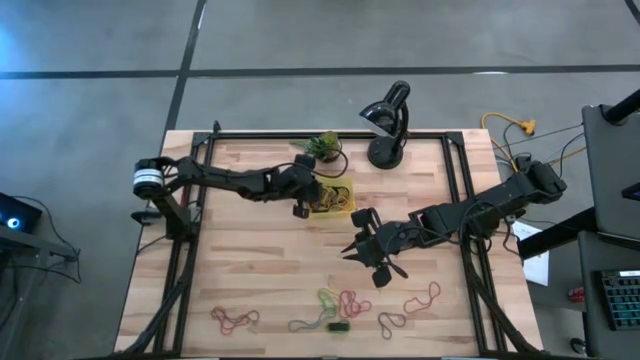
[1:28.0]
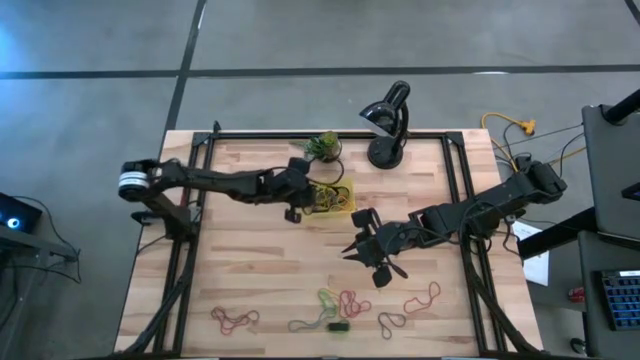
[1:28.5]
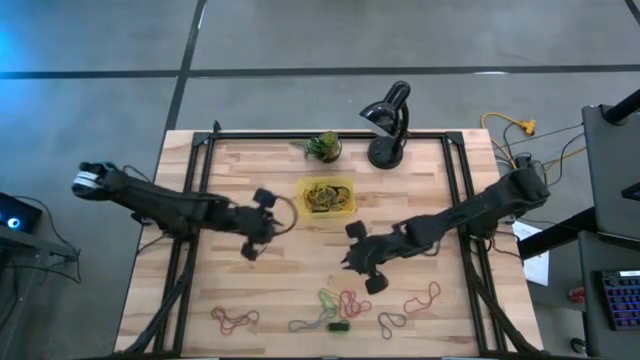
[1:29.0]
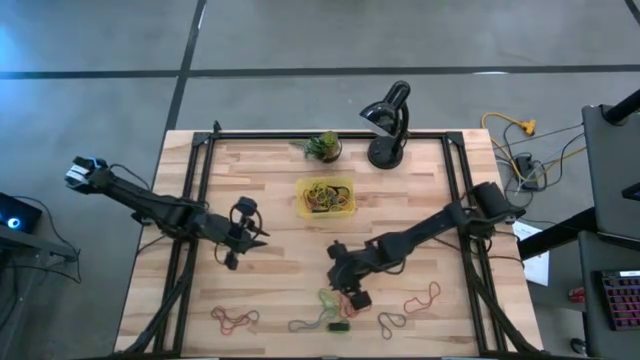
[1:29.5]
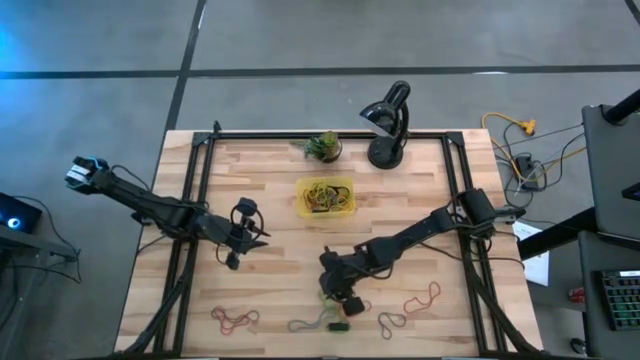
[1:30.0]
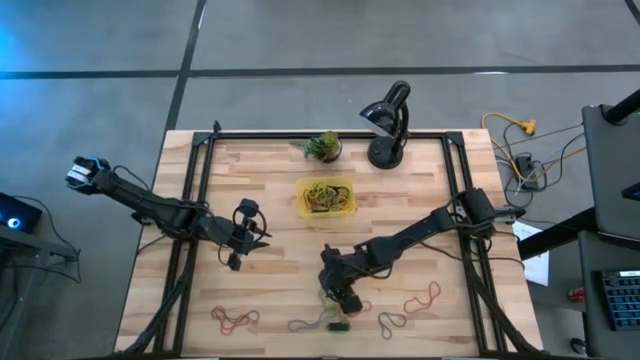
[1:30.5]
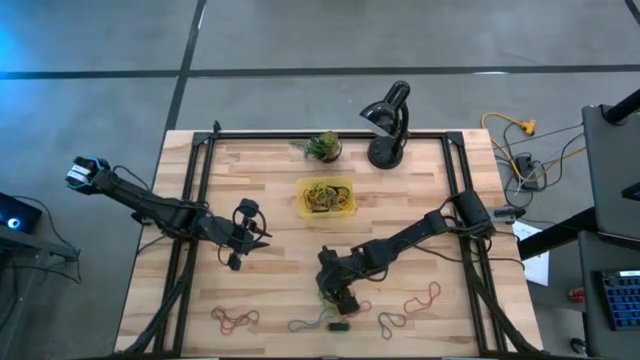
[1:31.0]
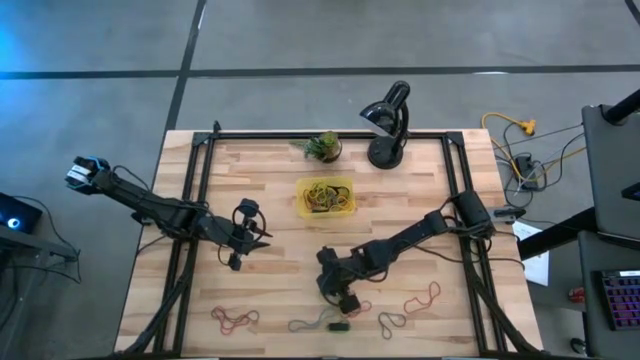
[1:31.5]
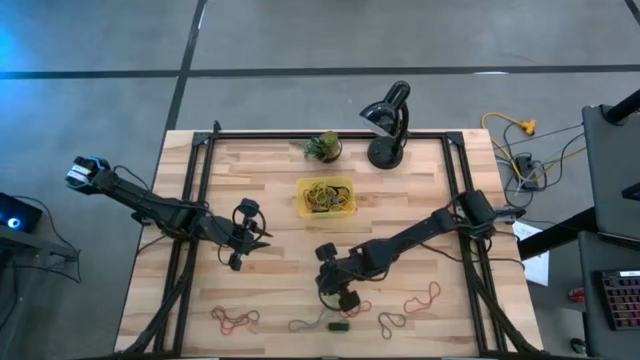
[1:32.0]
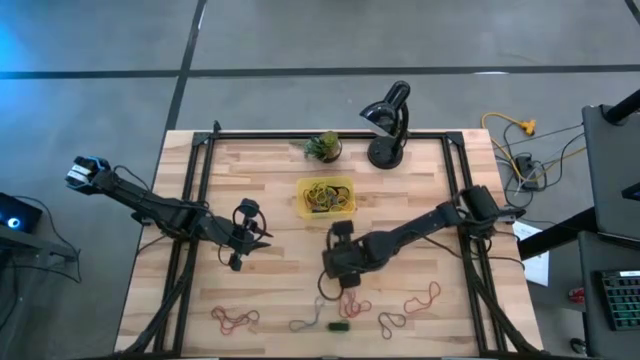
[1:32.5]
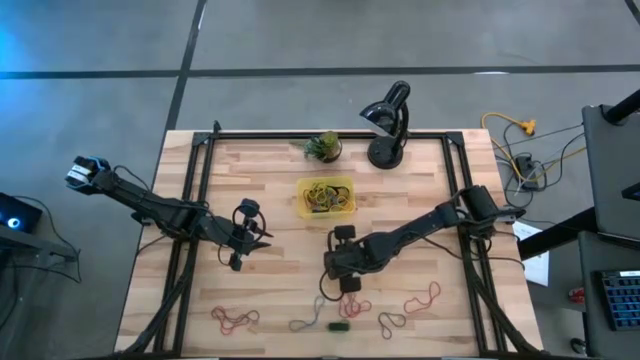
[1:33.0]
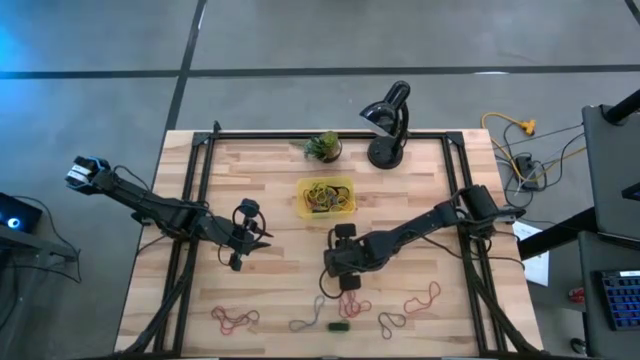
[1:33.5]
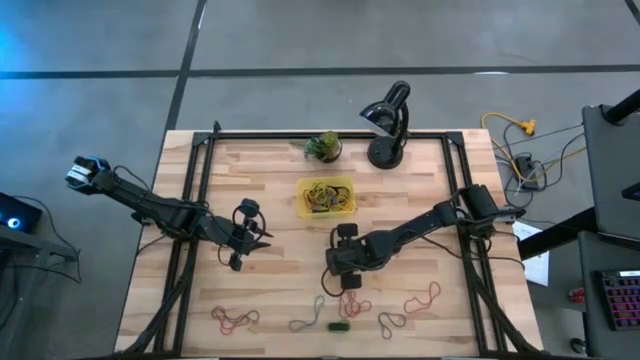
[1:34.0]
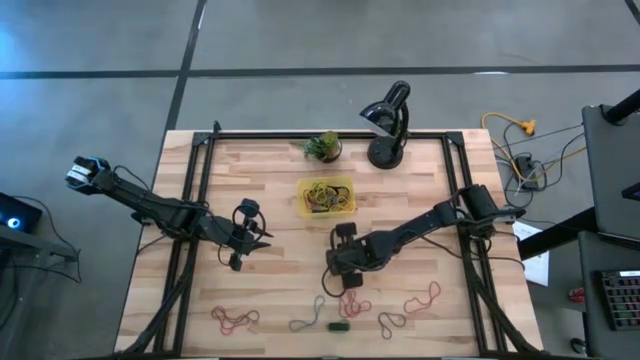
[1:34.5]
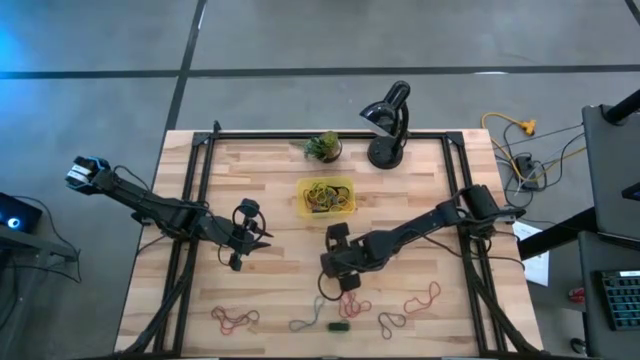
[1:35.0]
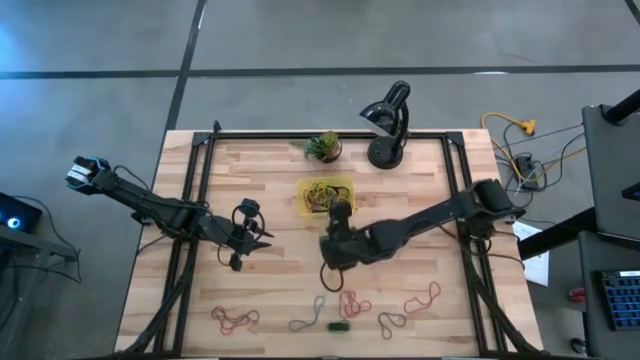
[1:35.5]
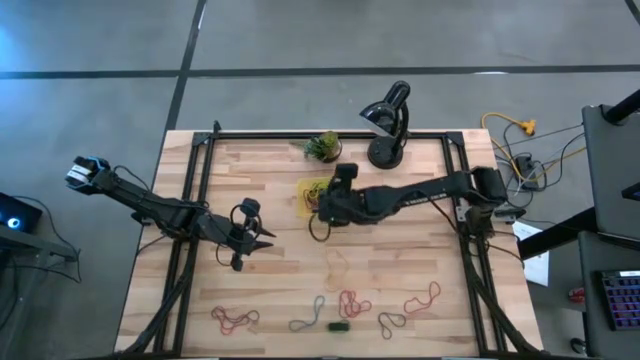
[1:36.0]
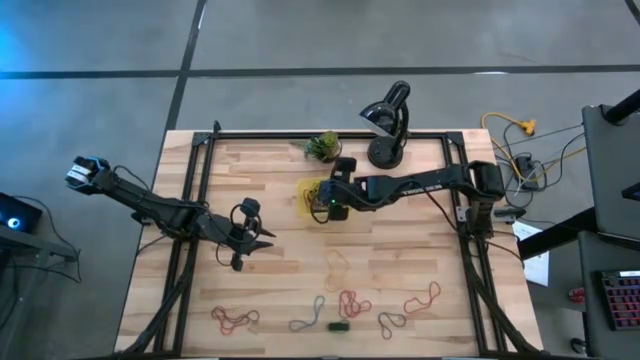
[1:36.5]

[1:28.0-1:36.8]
Task: Pick and place rubber bands into bin
Put the green rubber band in the yellow bin

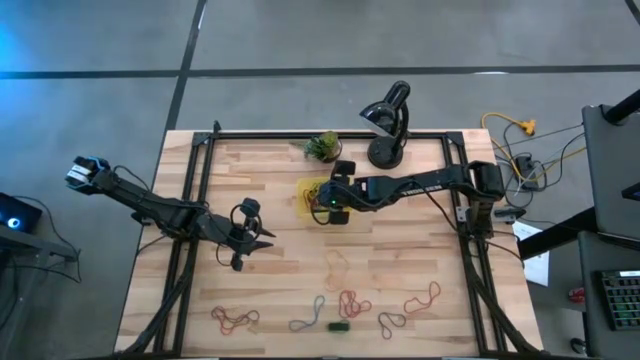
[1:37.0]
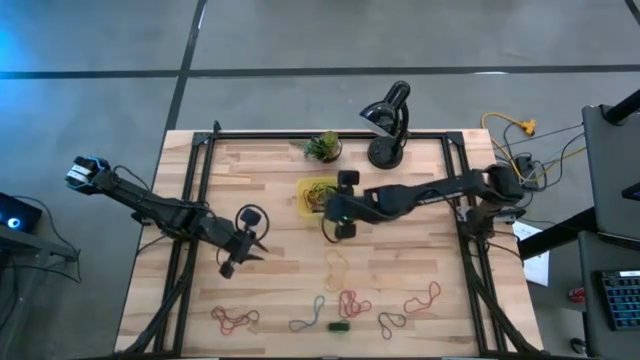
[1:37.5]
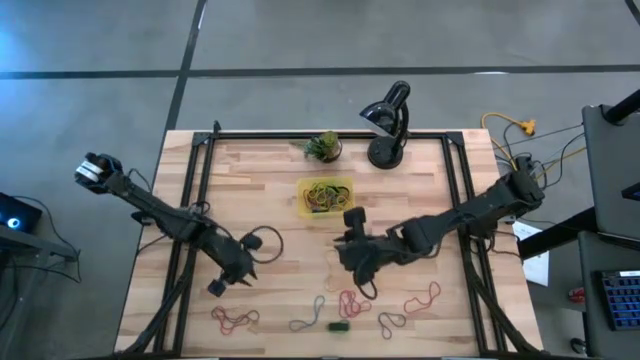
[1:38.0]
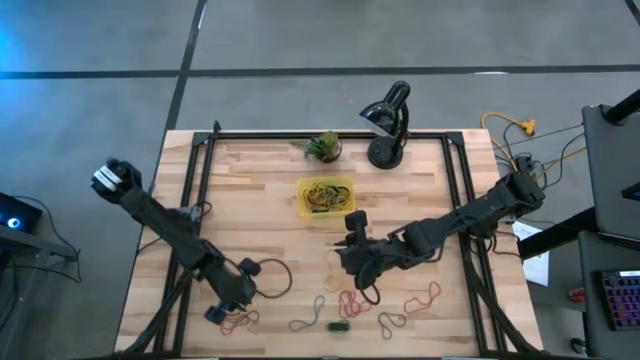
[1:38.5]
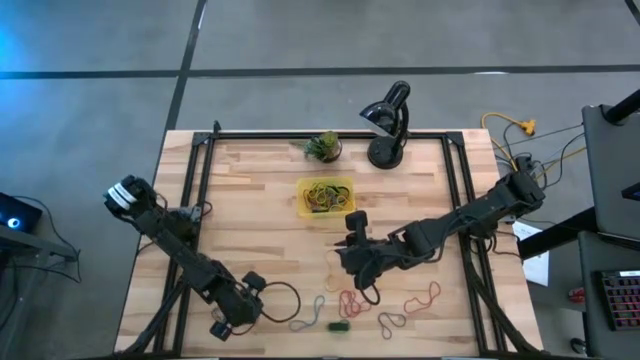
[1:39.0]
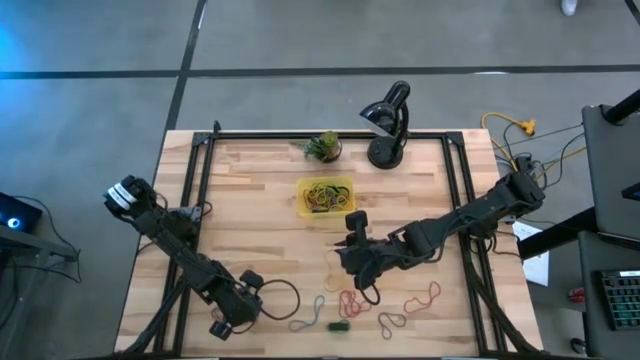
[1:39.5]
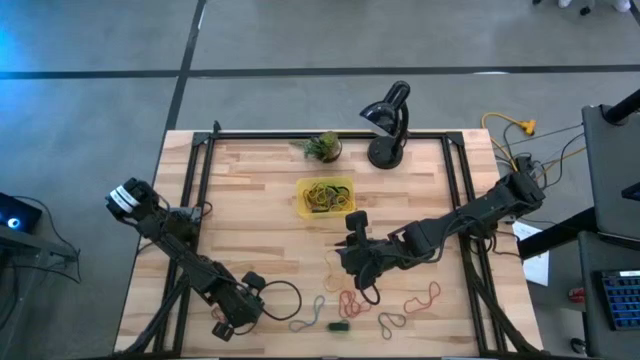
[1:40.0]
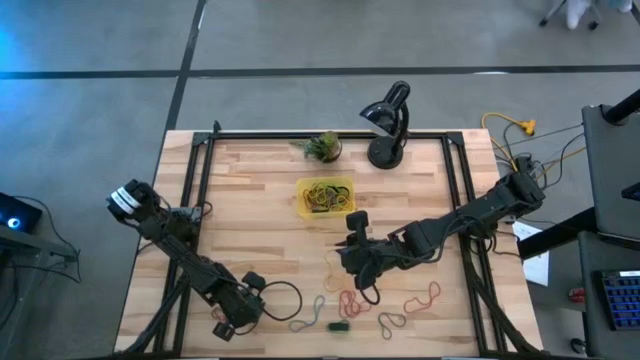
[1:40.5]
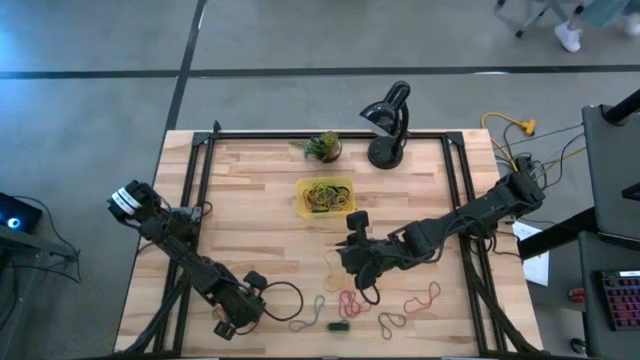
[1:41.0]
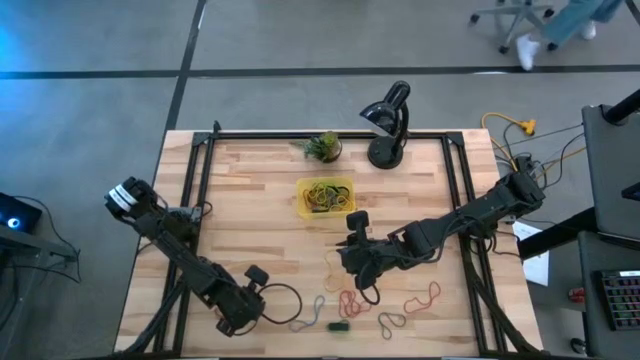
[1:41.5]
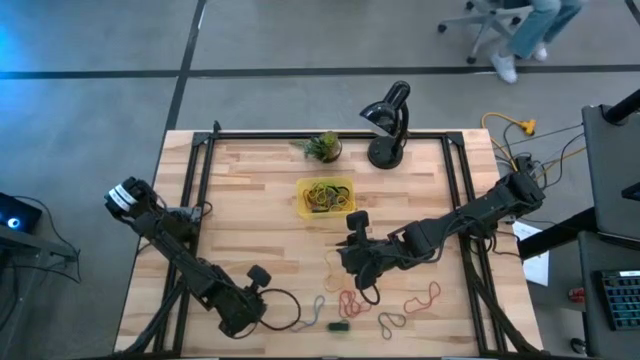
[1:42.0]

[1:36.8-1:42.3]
Put the purple rubber band in the yellow bin

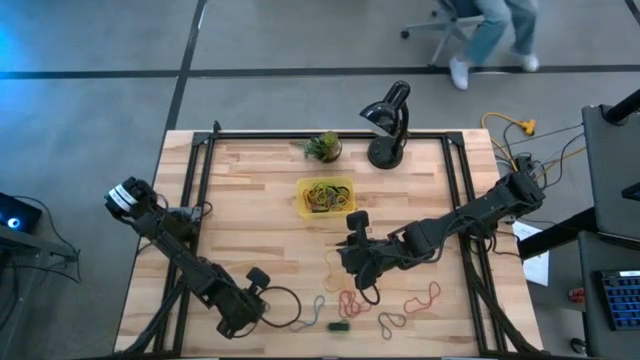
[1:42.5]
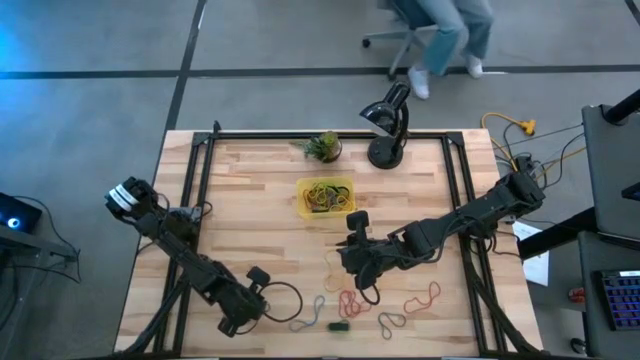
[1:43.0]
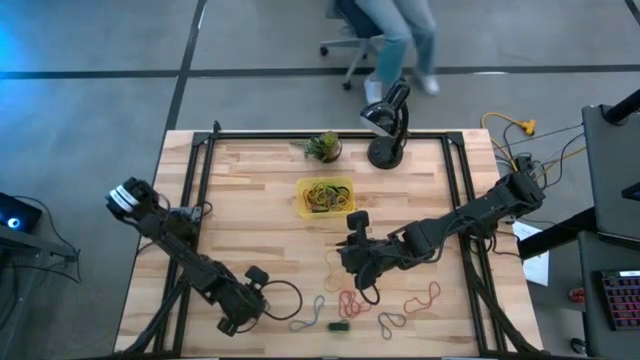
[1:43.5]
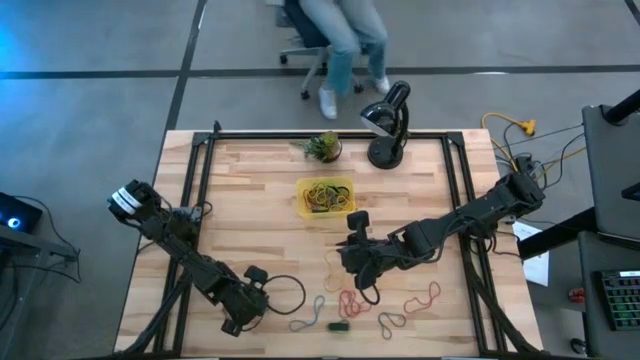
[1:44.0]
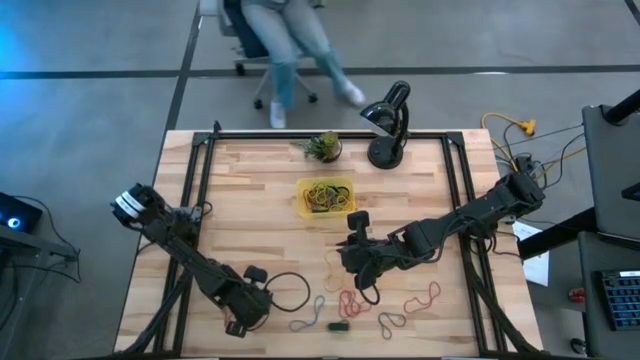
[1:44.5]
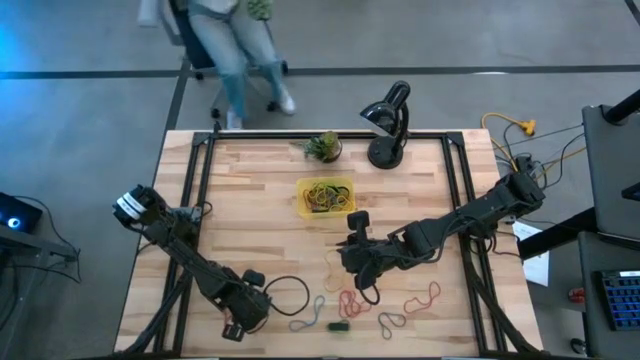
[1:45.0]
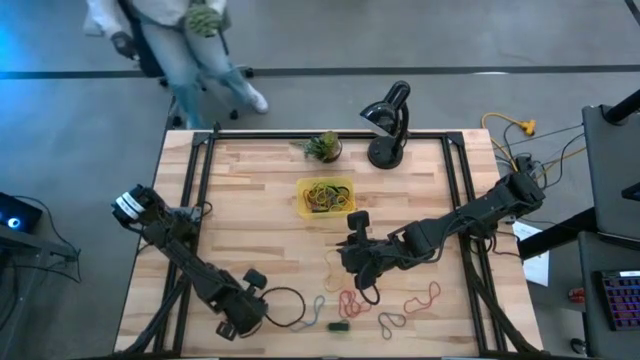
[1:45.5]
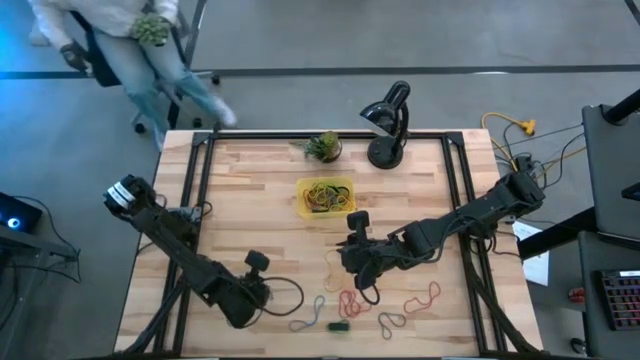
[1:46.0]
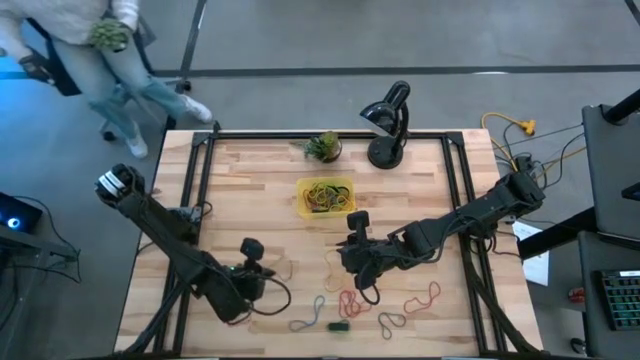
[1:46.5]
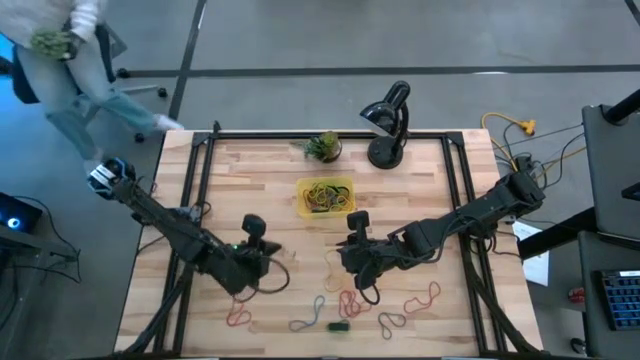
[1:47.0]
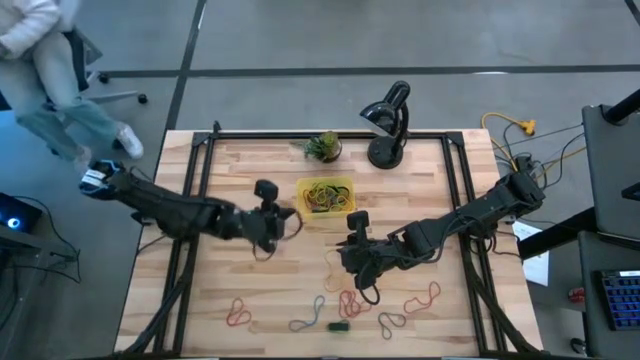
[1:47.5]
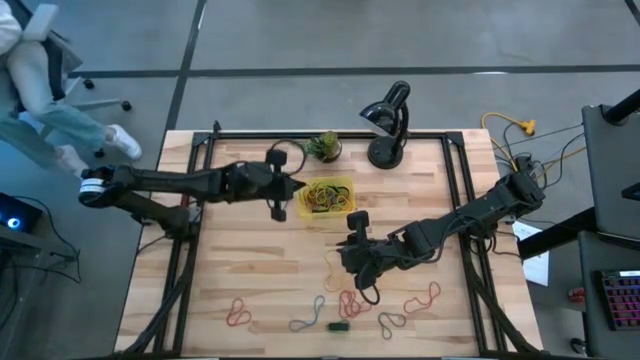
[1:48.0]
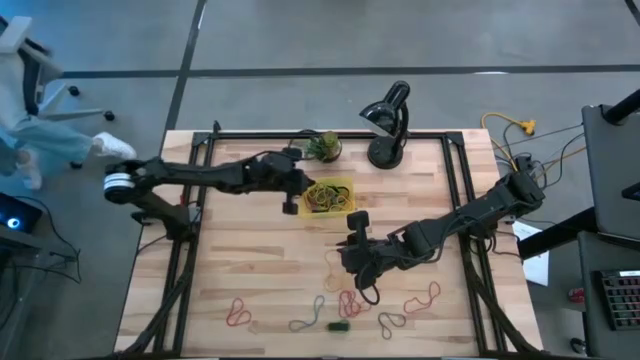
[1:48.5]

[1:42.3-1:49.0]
Put the purple rubber band in the yellow bin
